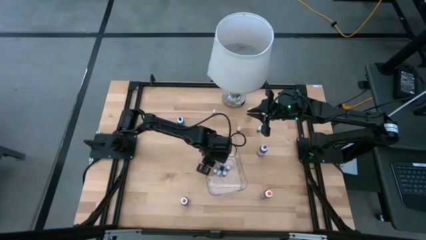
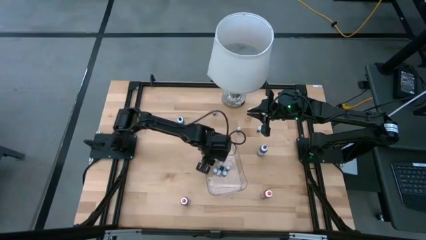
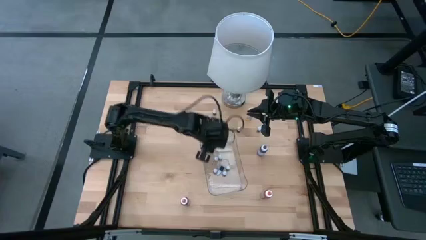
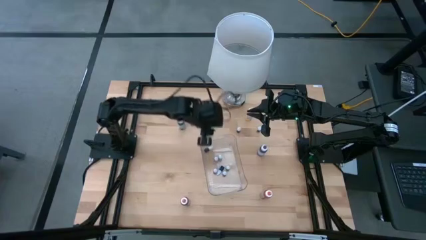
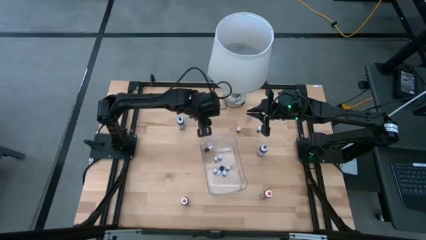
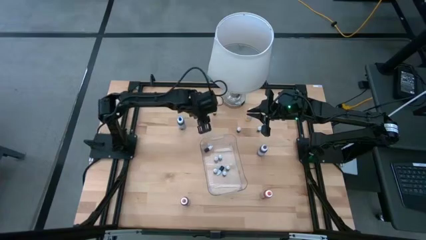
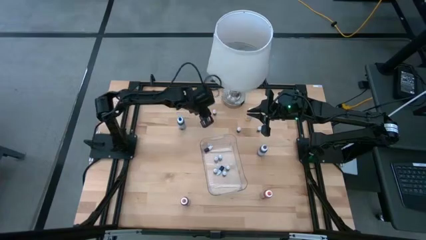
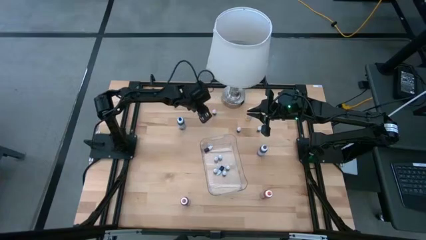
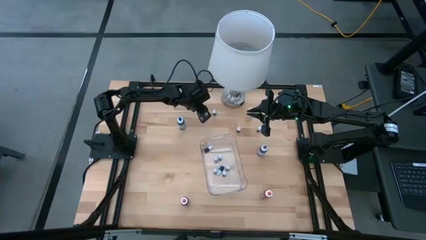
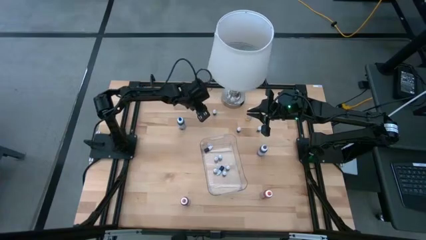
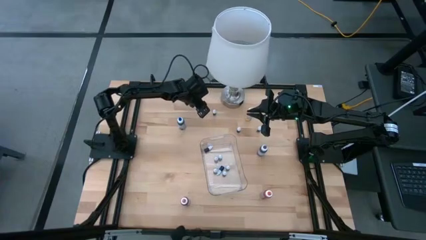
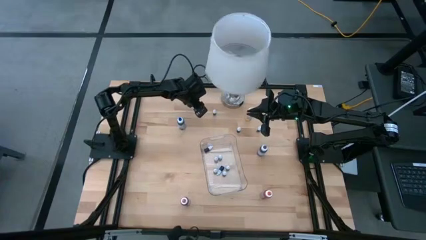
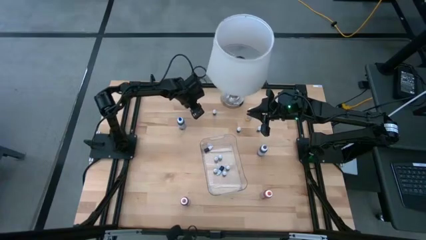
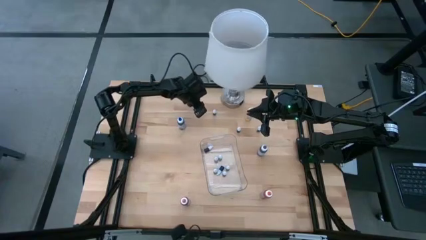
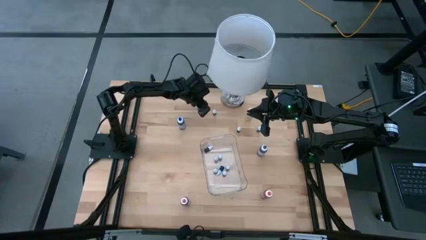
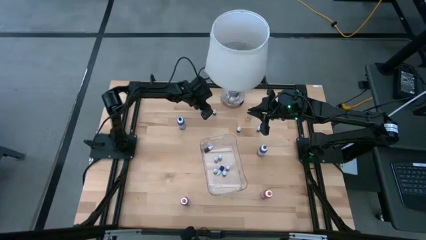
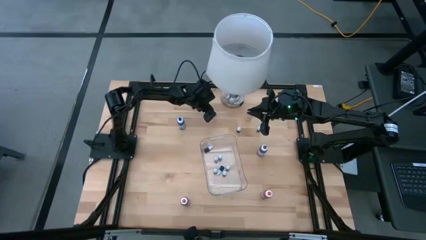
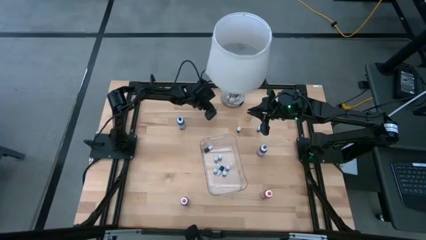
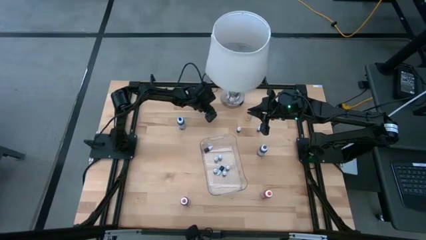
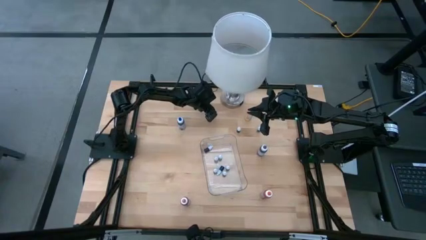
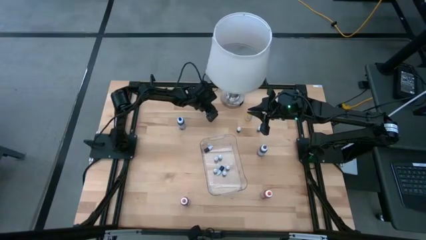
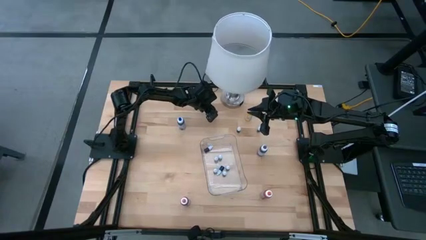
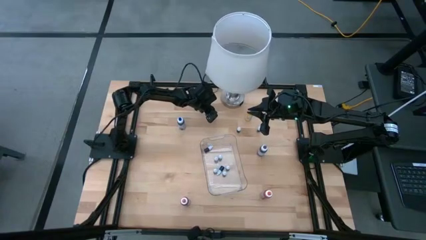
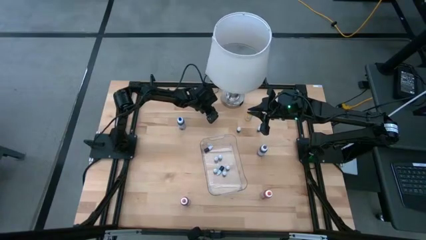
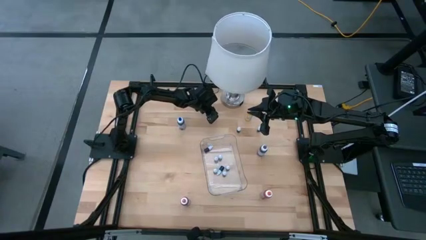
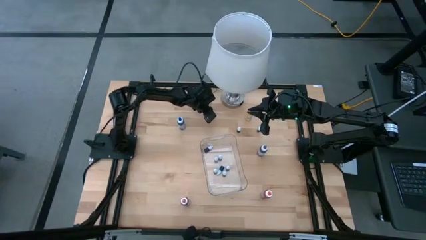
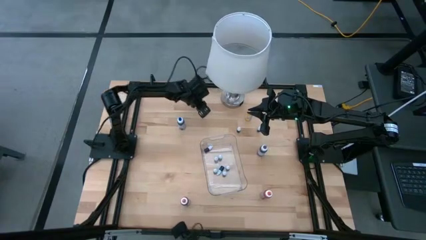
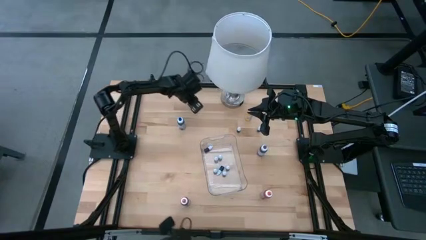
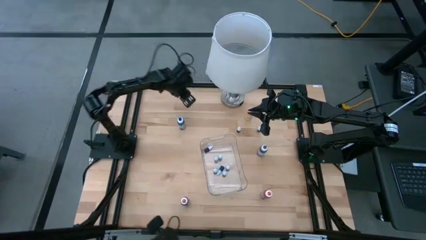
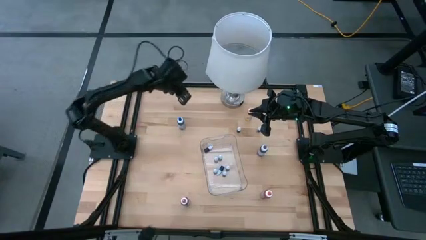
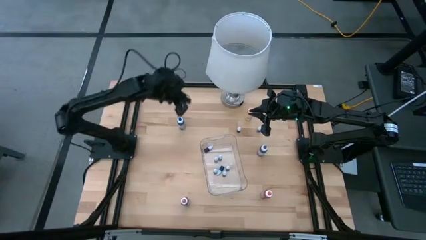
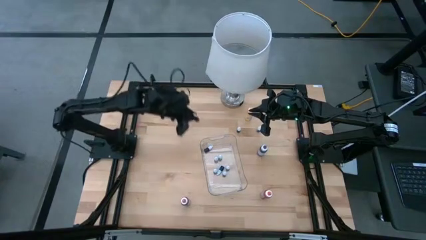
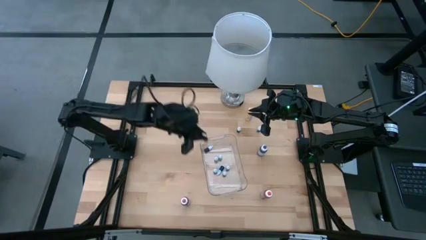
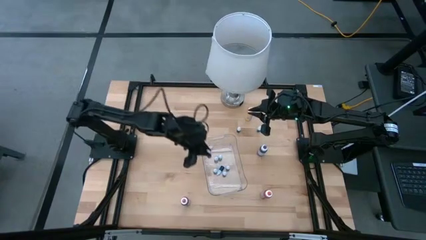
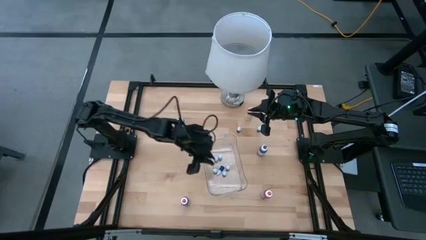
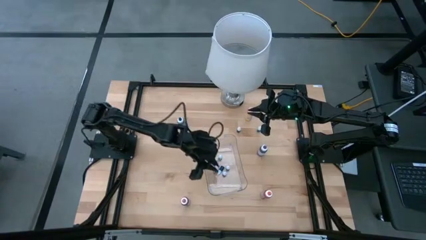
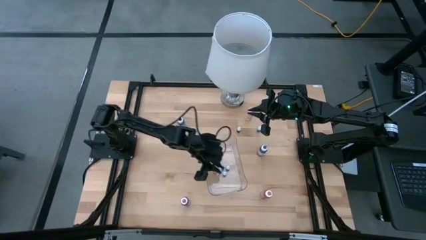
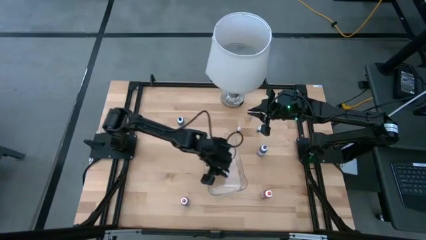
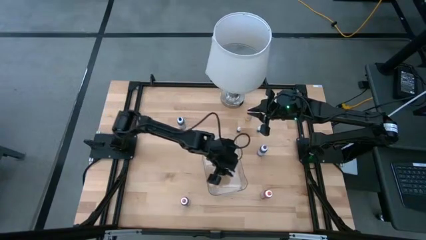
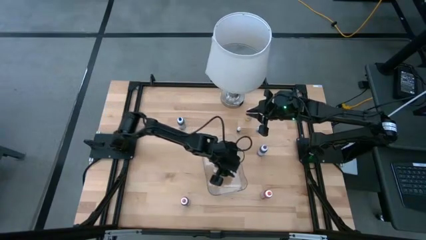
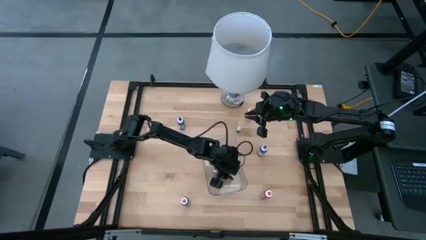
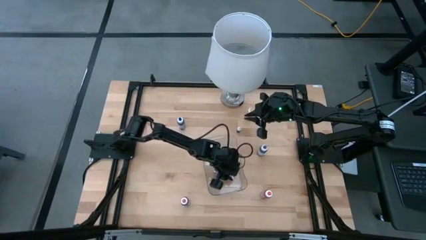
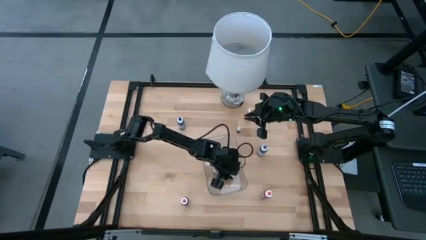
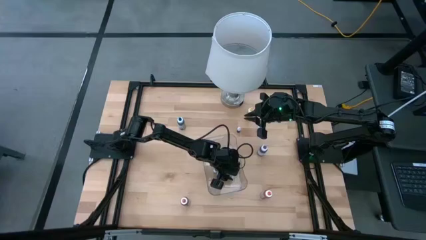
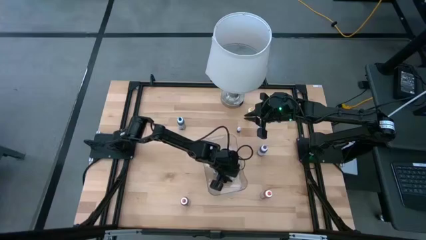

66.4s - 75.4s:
Task: Pick & Place food coloring
Put the small purple food coloring bottle into the transparent bin

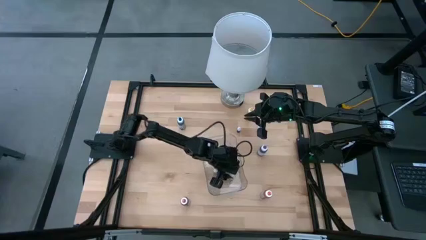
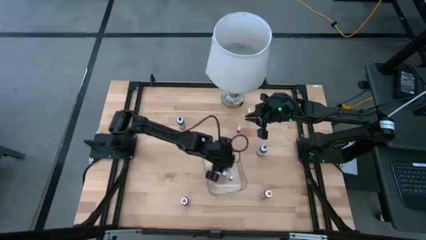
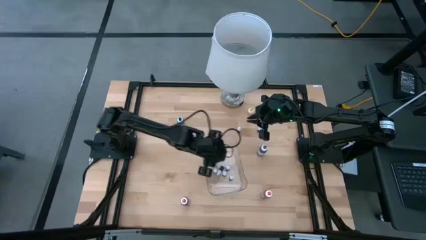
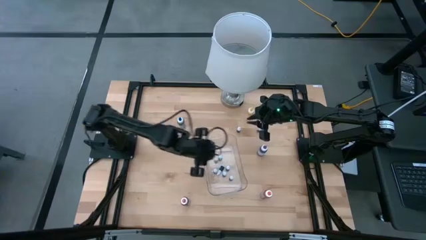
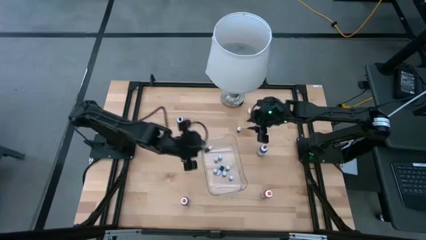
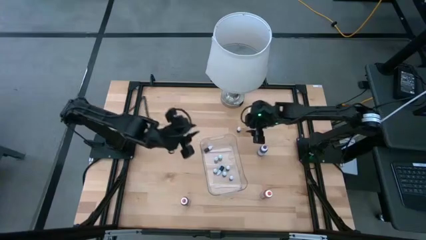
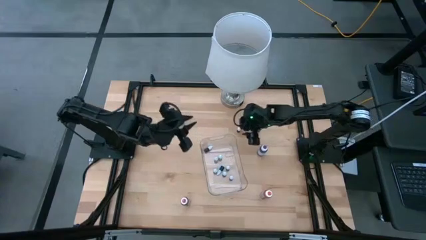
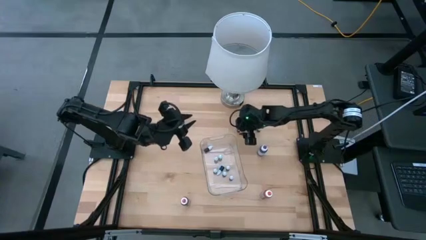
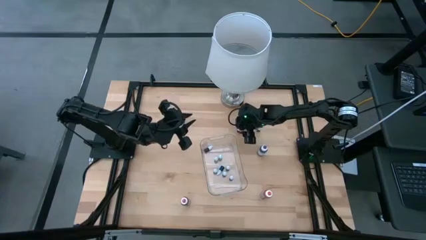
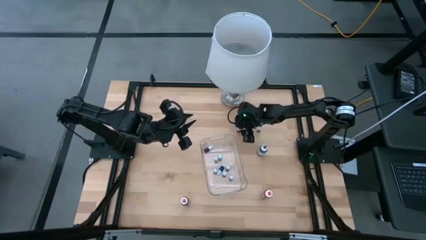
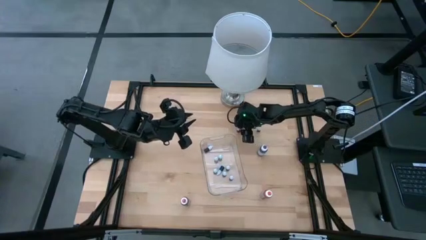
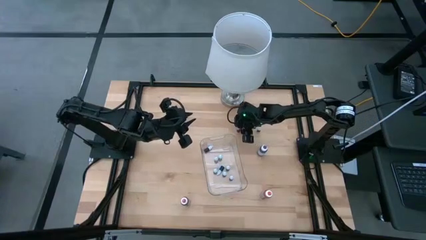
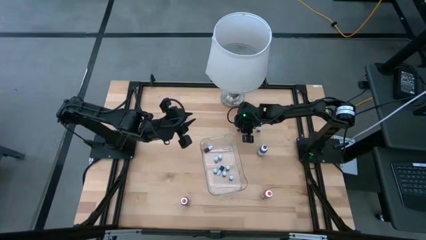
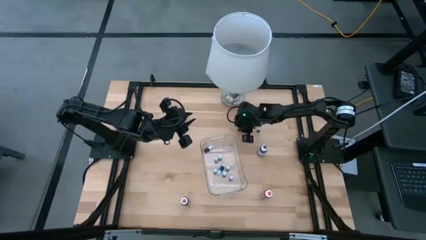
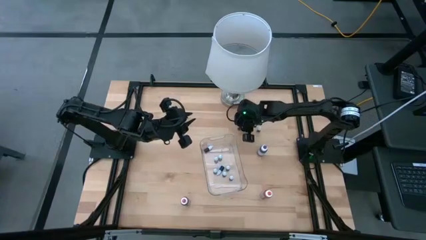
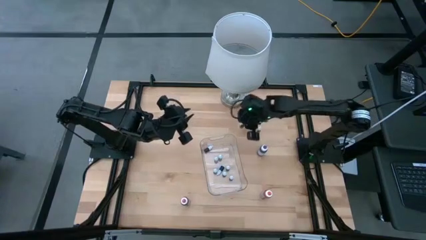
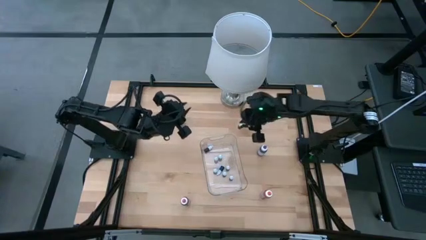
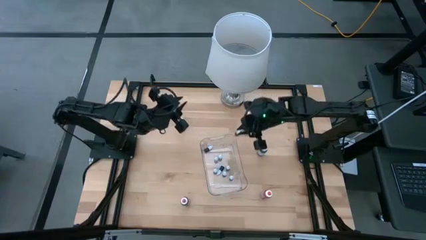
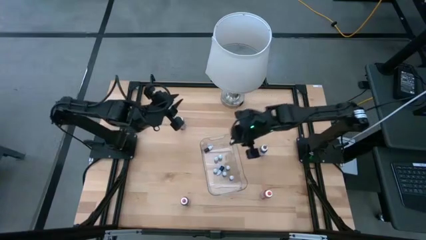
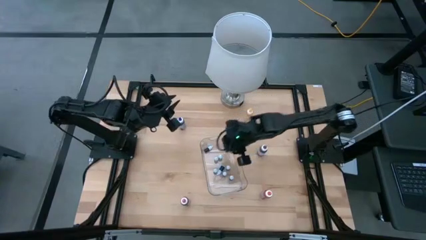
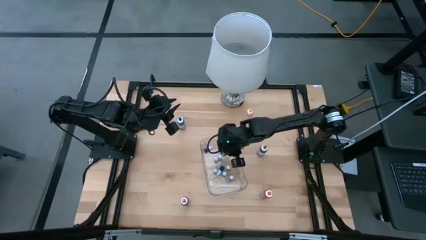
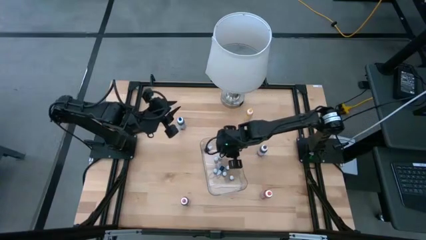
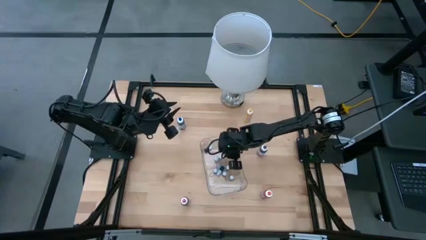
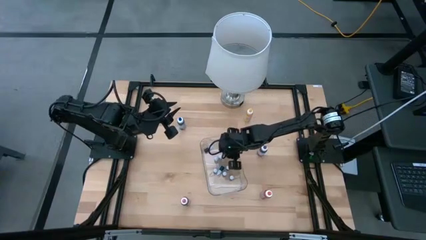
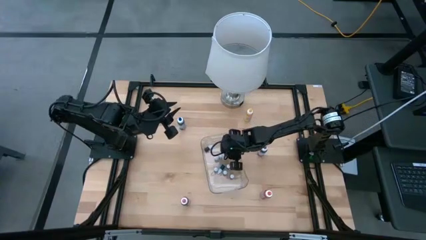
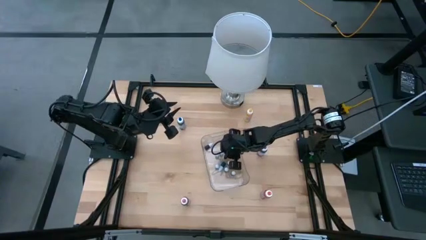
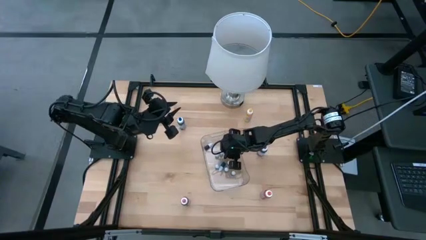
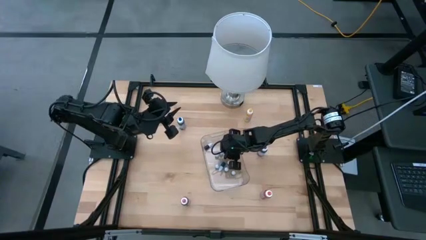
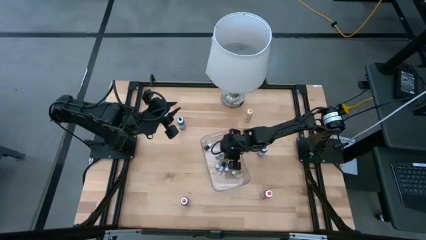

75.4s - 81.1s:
Put the small green food coloring bottle into the transparent bin

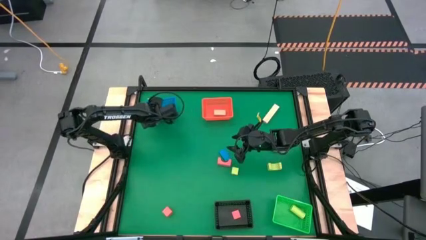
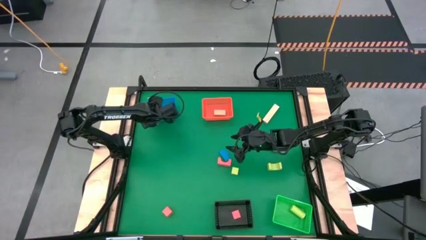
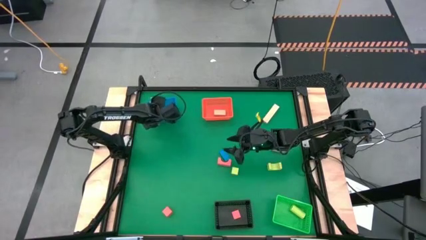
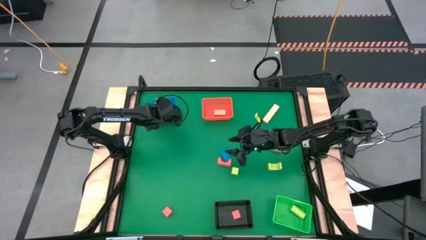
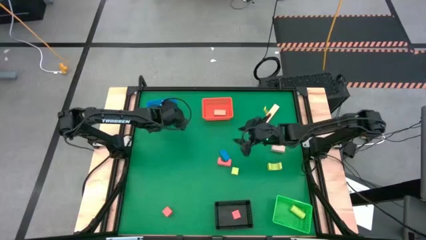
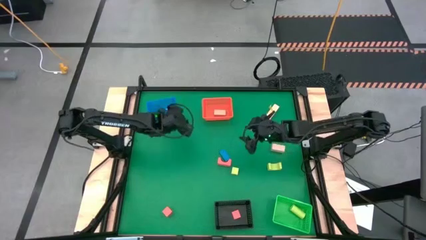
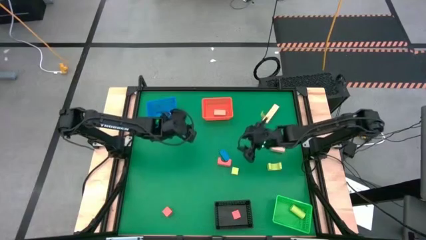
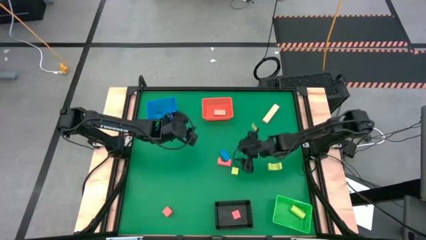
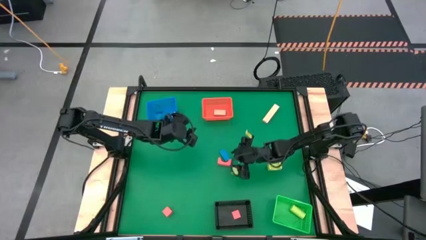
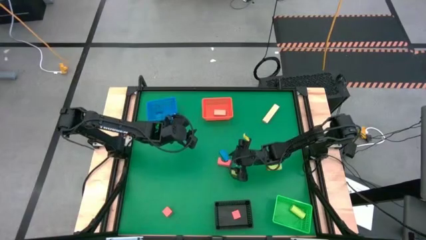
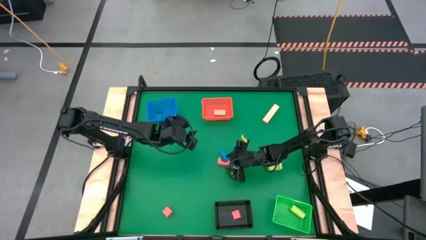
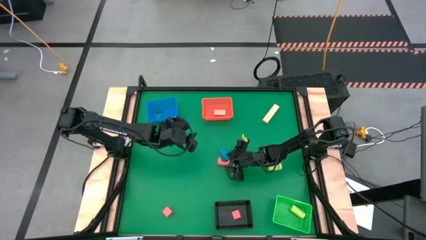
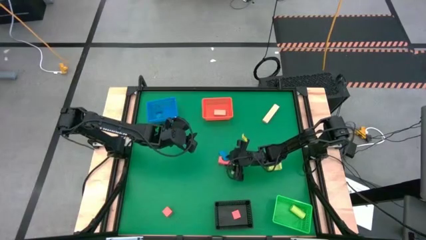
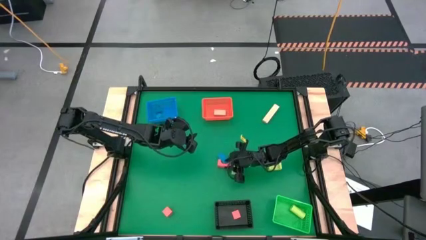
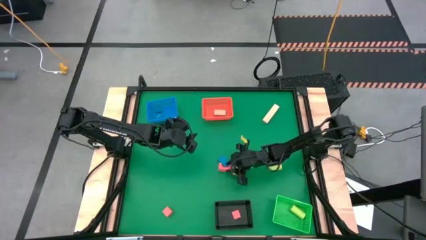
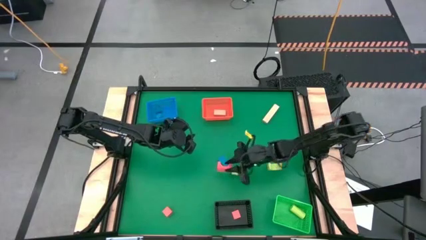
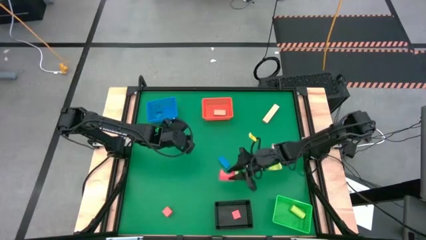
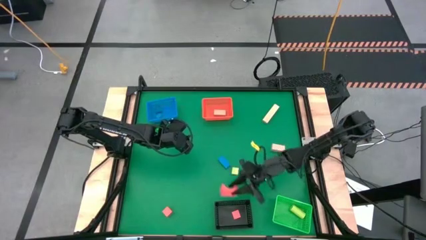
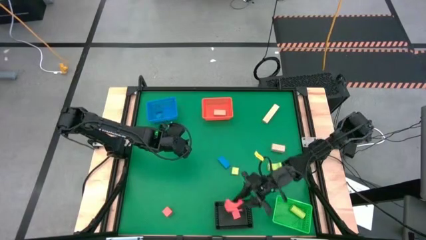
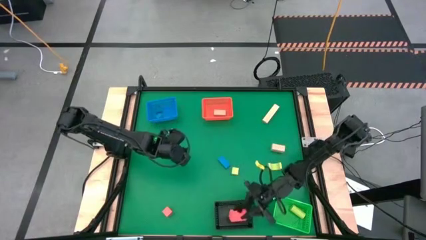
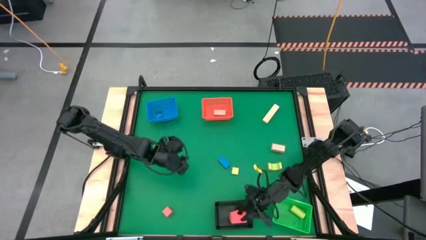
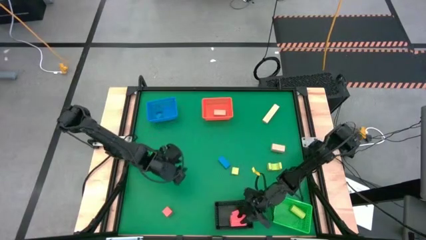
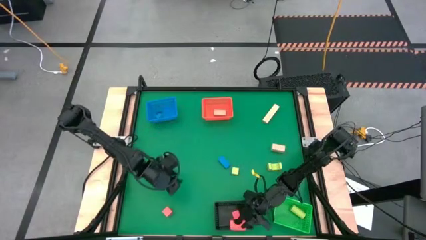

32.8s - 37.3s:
Task: Sort & place blocks by color
Put the top red block into the black bin
